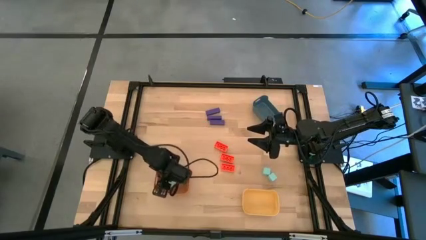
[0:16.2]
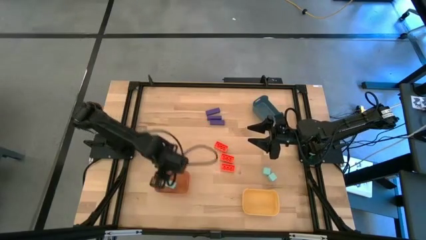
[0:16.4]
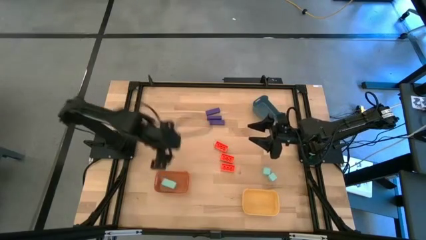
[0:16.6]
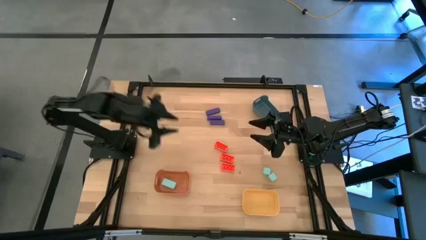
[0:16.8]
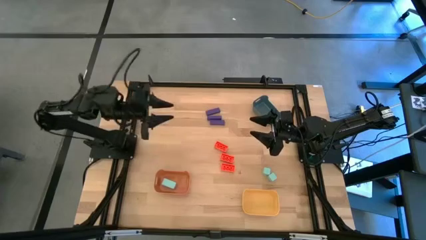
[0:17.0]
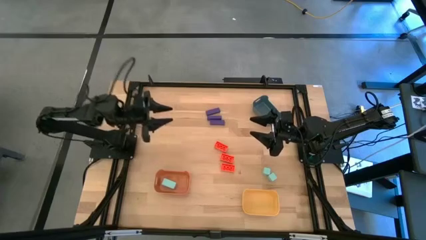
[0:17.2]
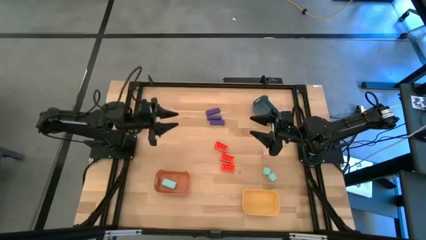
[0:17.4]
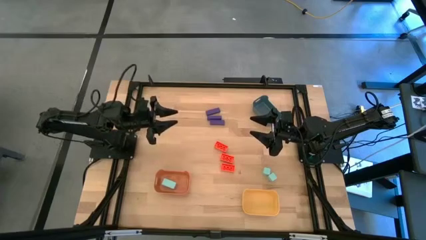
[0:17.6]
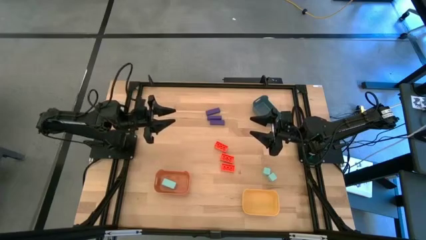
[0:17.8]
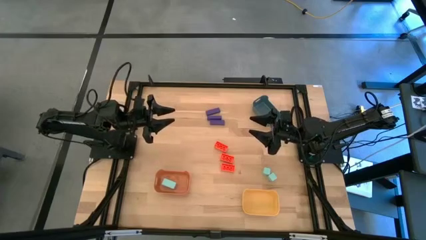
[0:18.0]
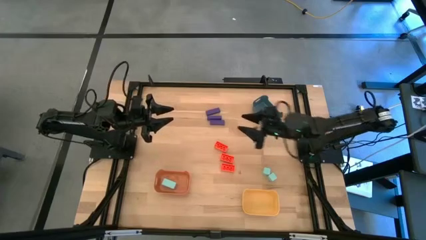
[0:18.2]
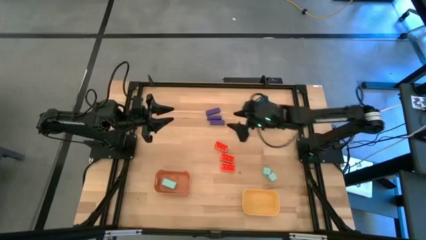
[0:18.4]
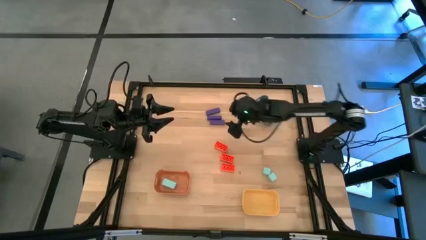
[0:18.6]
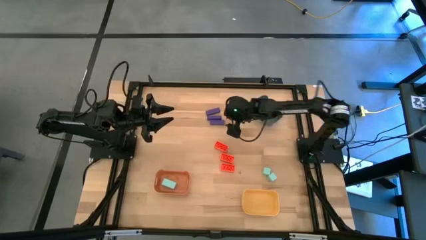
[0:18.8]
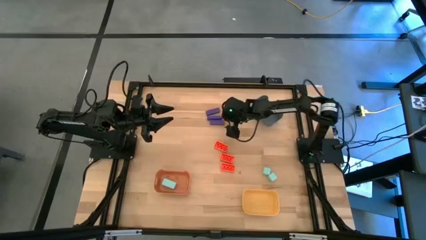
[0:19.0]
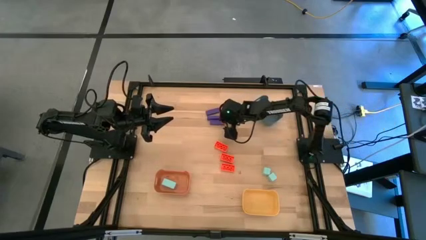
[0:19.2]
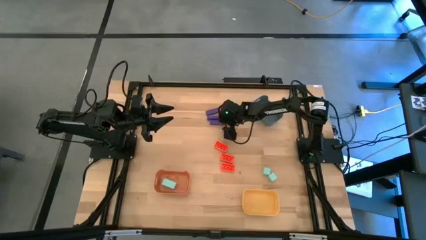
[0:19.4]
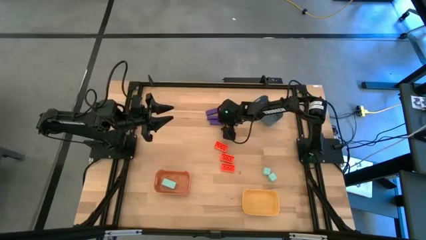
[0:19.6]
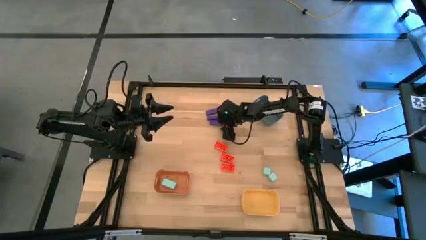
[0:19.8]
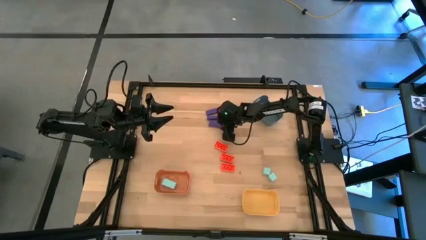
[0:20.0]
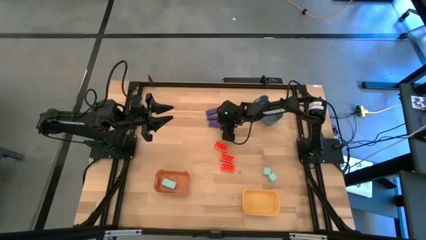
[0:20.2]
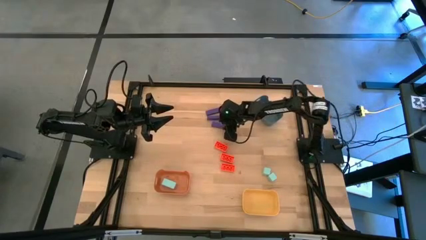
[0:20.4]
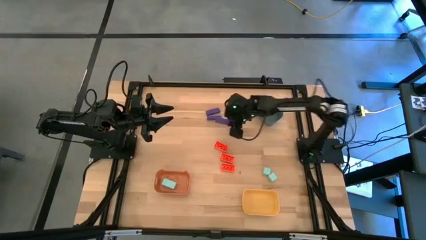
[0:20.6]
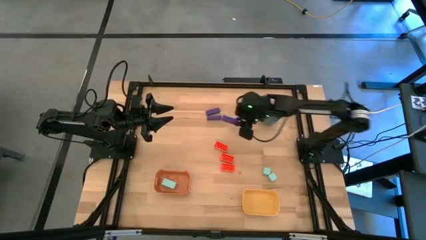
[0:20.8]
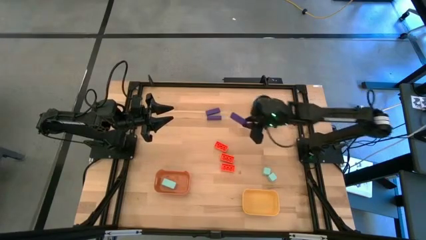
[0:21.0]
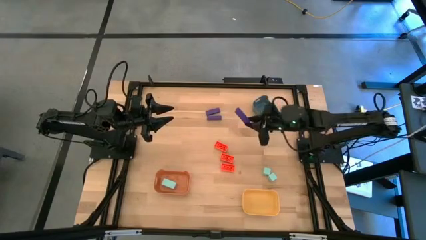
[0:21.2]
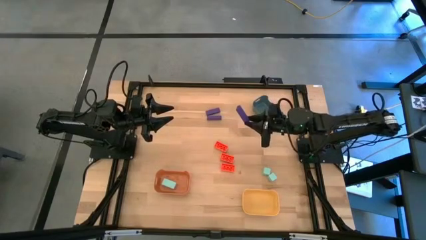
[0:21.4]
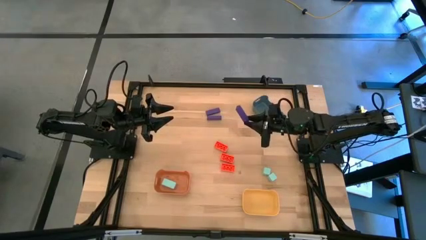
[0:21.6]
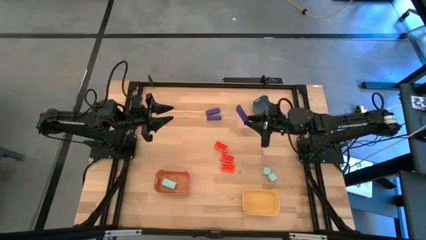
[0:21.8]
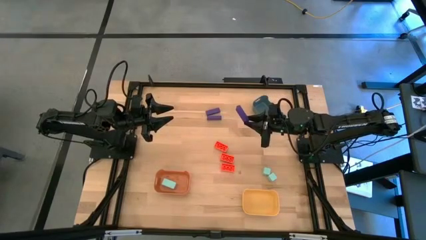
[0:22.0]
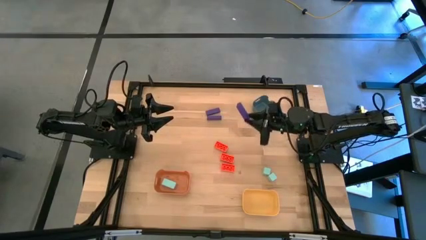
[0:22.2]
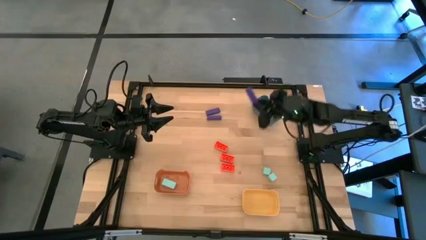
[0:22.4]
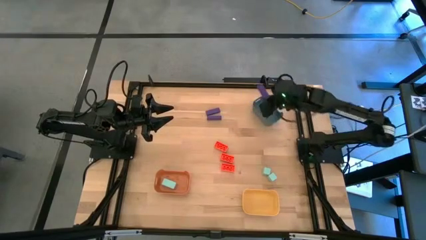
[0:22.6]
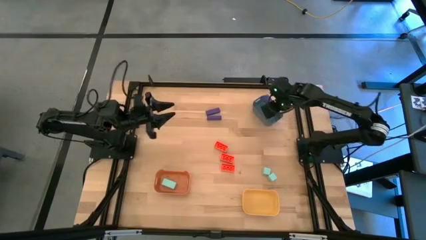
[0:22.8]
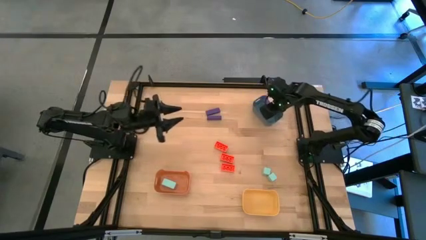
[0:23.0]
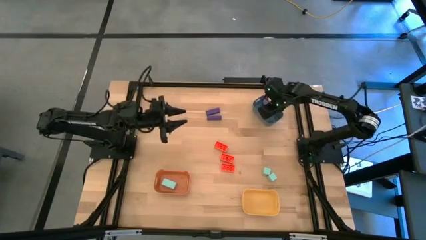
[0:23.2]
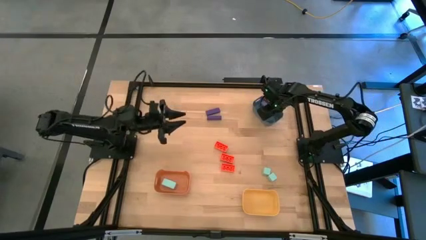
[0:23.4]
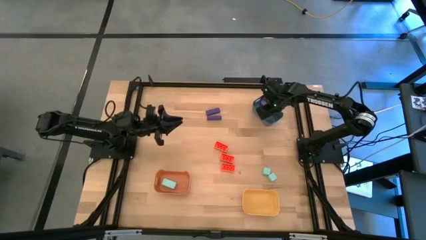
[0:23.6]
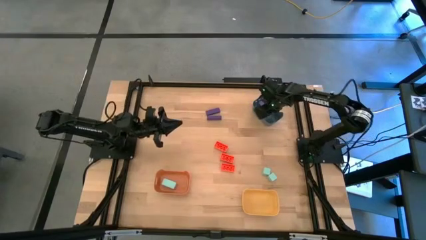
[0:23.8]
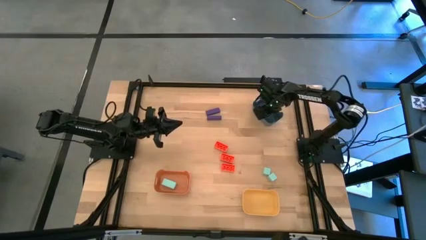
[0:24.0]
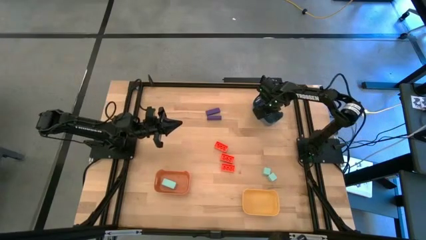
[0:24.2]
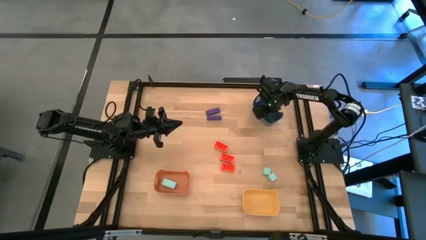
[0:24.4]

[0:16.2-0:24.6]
Task: Sort & place blocks by color
Put the bottom violet block into the gray bin
